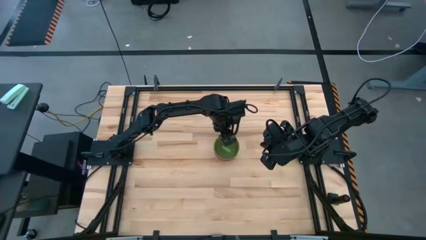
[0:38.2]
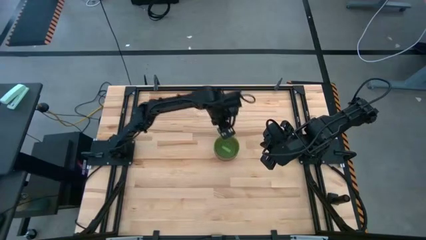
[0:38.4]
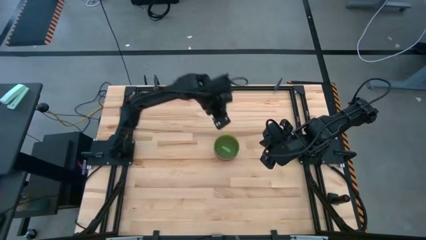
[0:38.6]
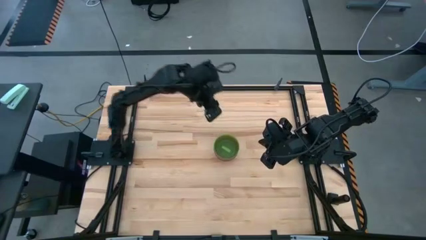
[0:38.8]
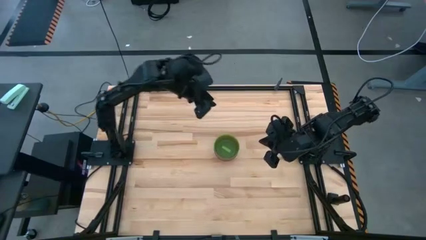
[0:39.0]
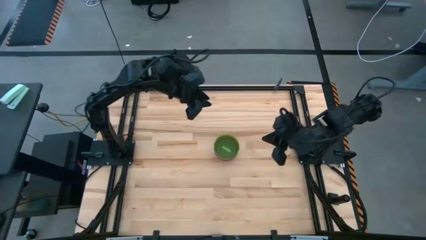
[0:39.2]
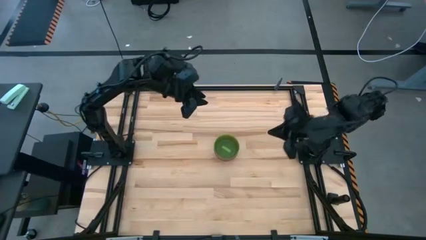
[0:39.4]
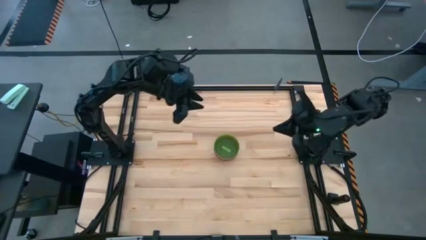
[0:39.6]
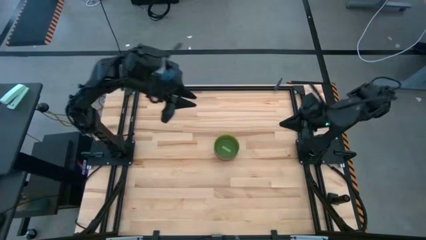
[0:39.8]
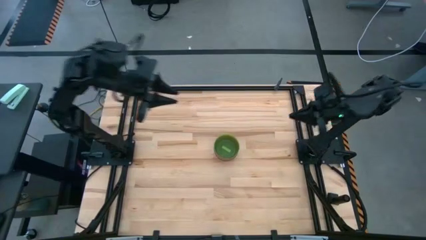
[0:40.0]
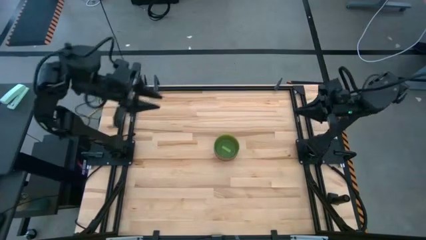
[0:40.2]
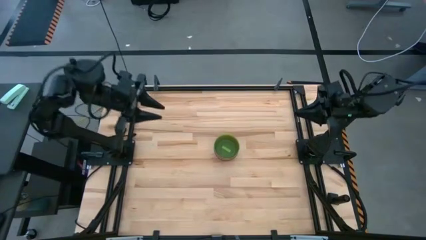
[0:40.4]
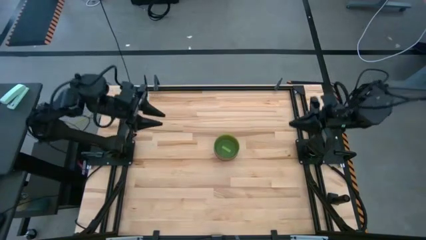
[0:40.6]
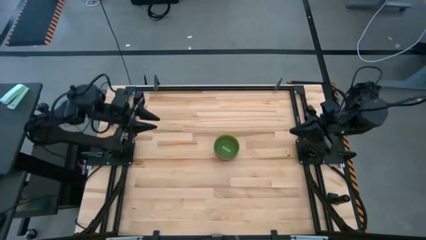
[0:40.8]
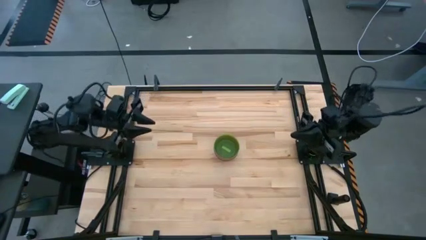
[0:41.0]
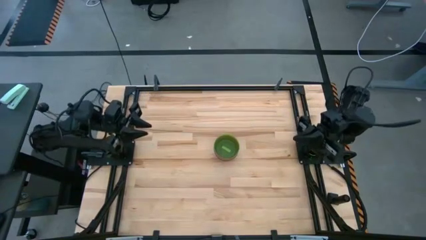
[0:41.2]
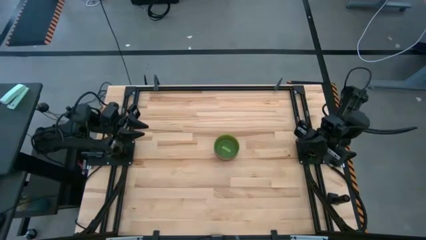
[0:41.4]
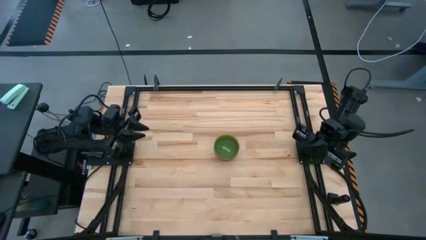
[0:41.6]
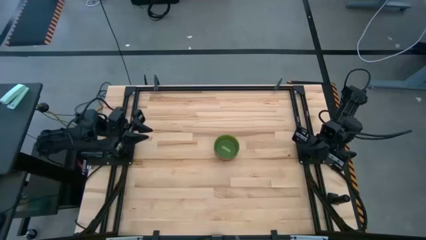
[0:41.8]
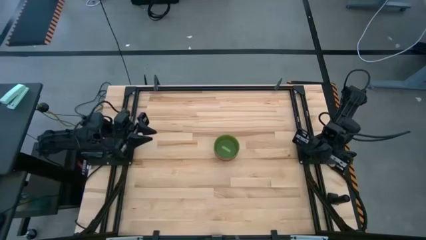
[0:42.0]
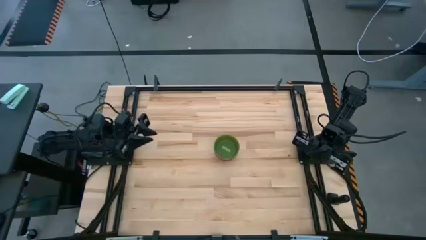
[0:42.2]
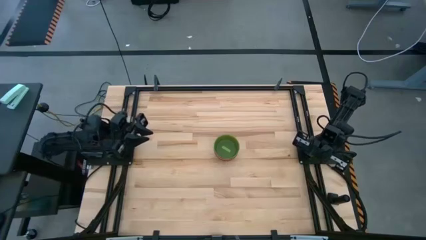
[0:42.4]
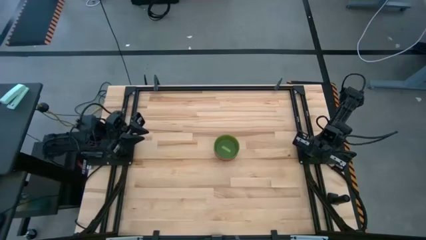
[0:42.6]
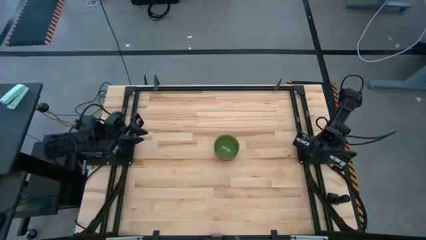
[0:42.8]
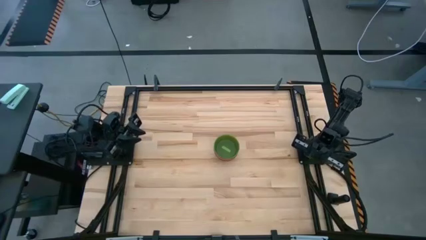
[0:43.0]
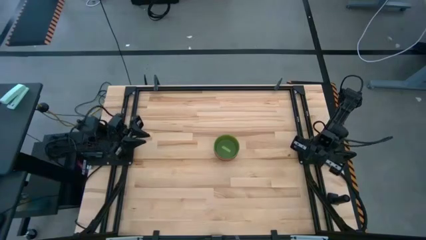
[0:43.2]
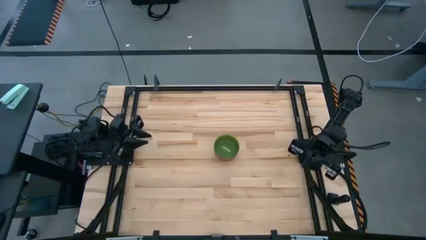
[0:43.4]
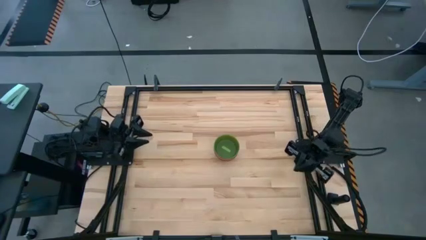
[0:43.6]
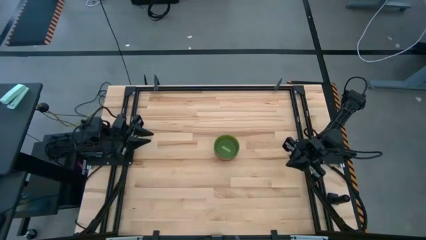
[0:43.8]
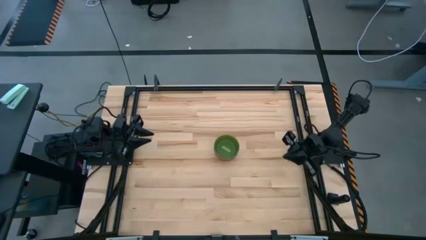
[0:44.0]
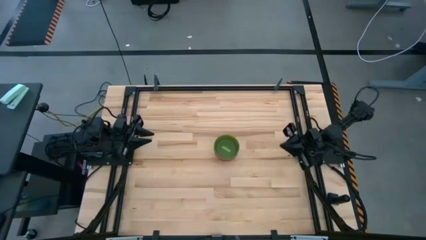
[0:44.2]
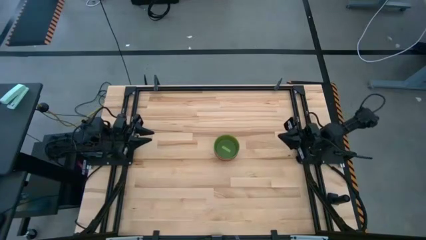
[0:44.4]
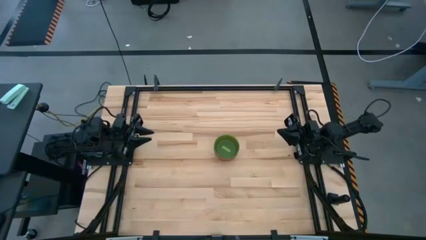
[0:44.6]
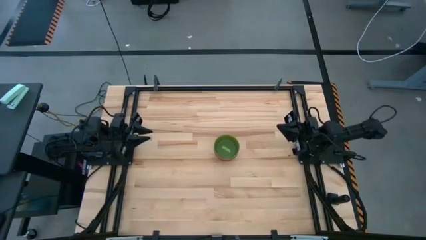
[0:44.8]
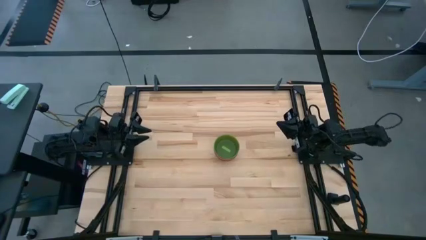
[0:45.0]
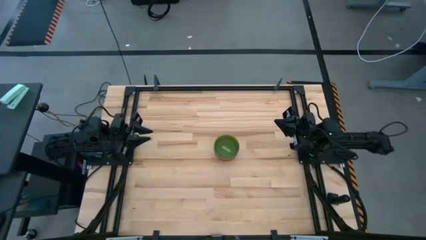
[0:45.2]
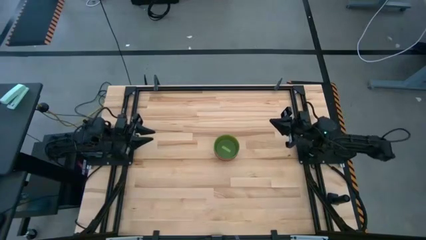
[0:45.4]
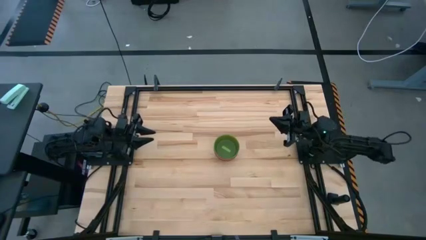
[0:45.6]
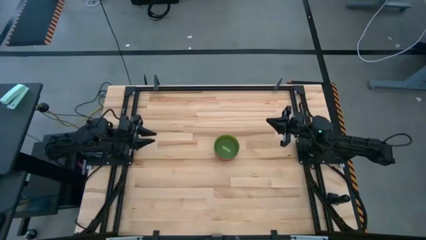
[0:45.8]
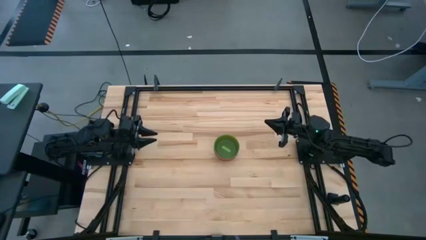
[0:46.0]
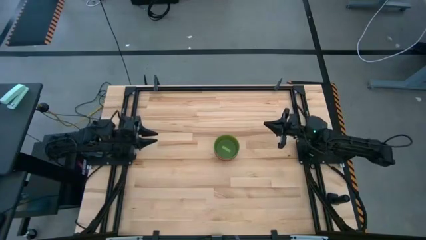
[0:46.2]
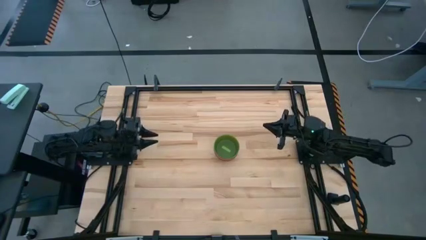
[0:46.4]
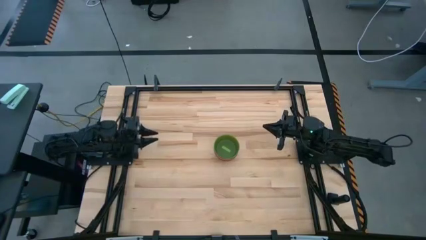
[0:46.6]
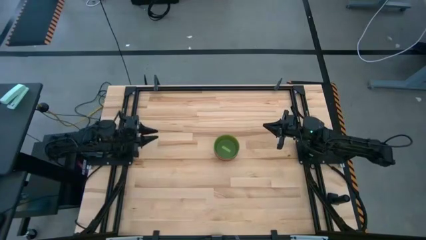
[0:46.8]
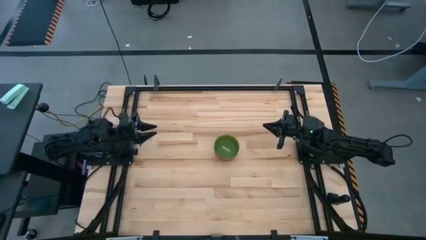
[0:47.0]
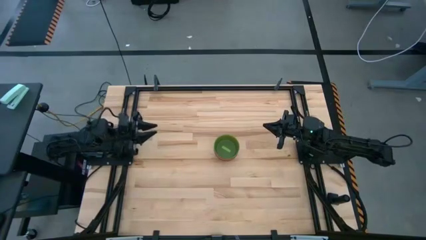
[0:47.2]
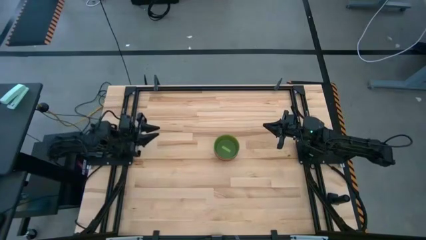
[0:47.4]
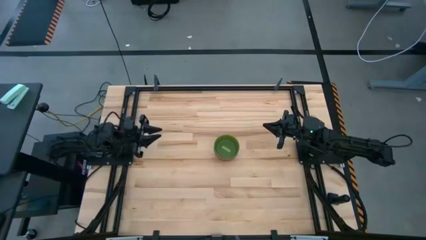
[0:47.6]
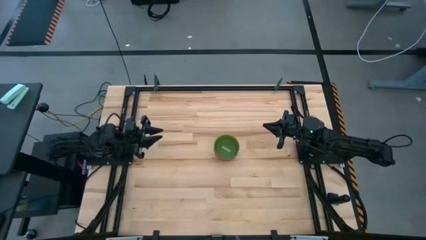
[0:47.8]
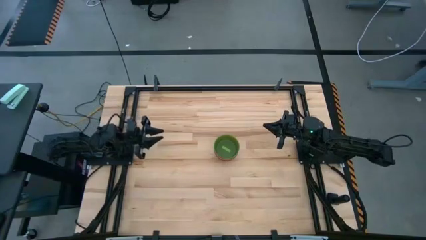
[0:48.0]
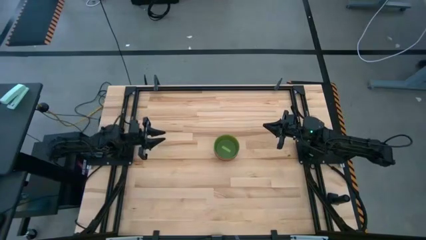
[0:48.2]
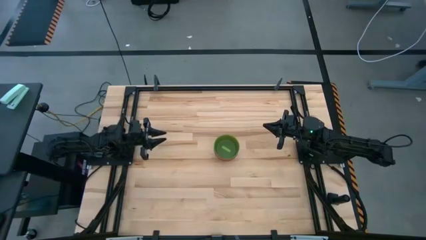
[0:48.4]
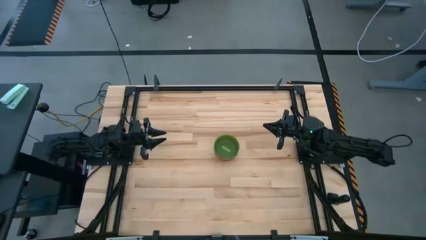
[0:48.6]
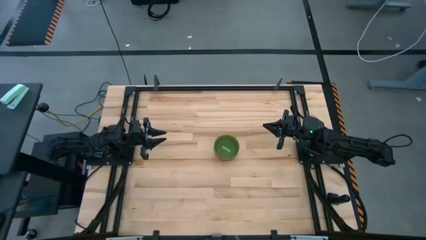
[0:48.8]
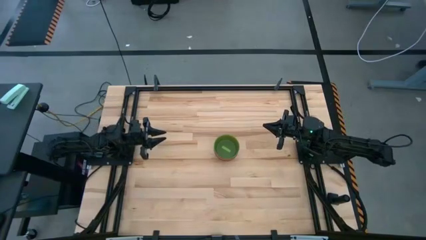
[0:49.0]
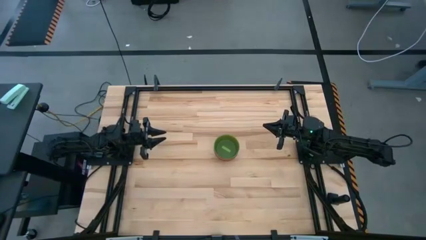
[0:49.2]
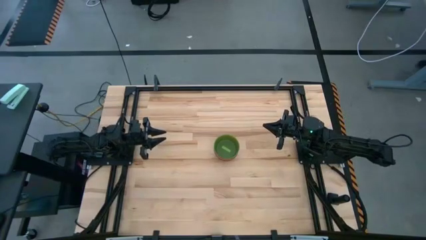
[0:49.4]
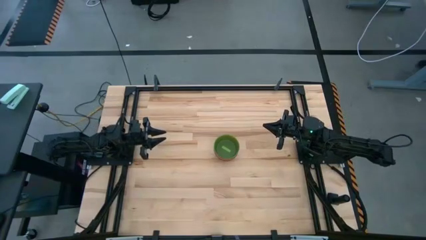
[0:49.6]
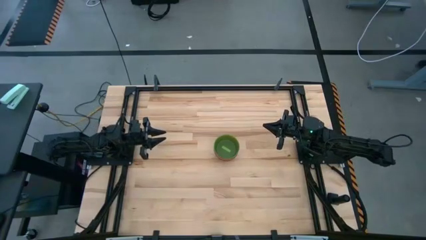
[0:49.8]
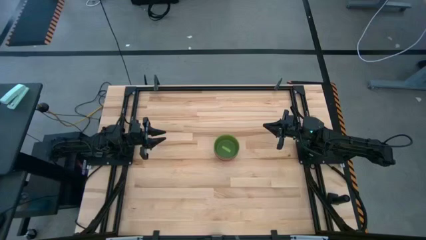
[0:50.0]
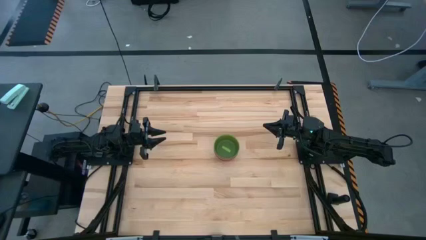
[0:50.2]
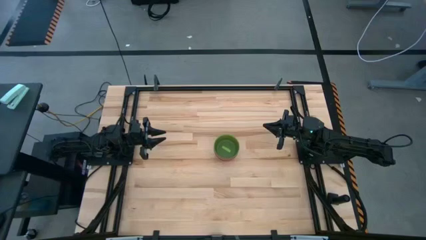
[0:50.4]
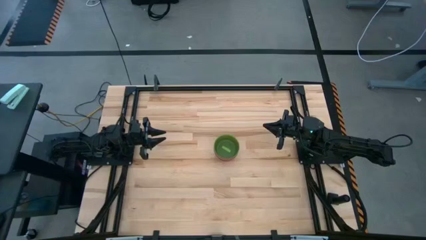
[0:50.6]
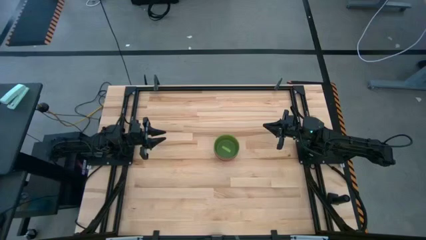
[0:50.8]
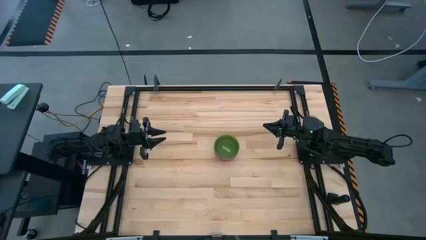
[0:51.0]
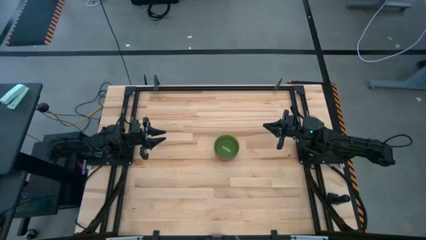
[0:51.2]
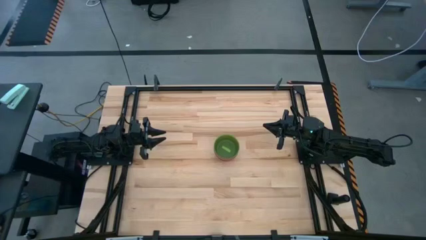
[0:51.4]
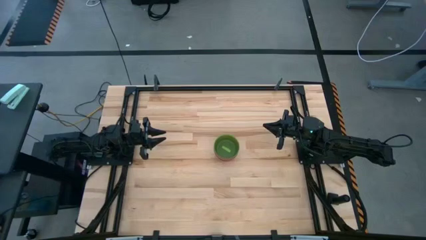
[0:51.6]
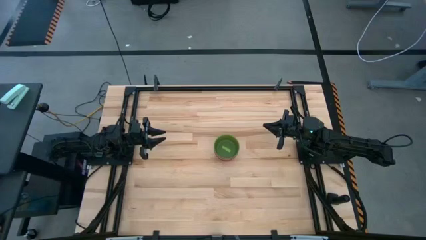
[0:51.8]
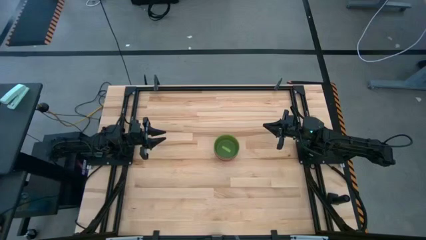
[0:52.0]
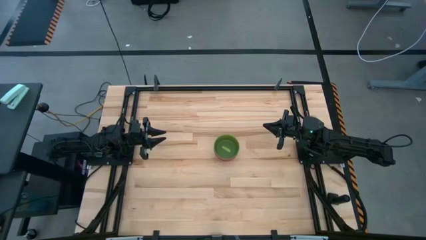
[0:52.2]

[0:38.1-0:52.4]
Task: Nest bowls inside each other
Return to Home Position

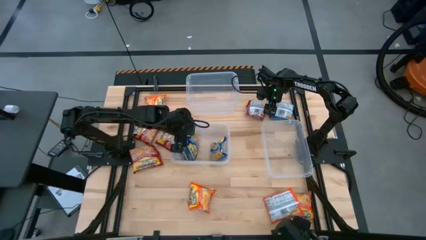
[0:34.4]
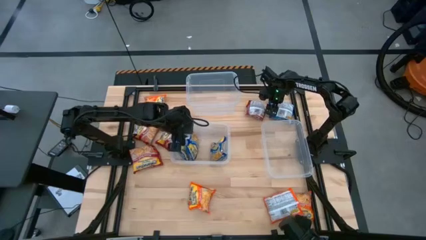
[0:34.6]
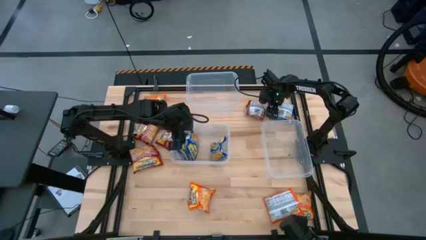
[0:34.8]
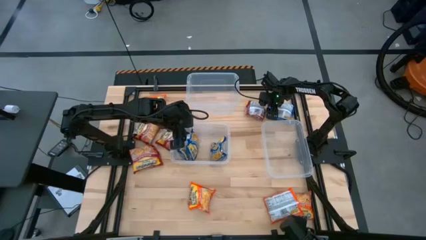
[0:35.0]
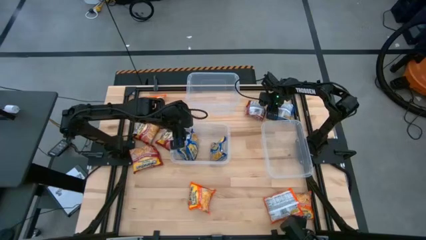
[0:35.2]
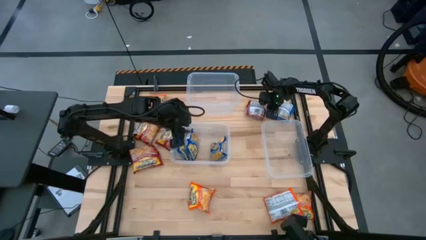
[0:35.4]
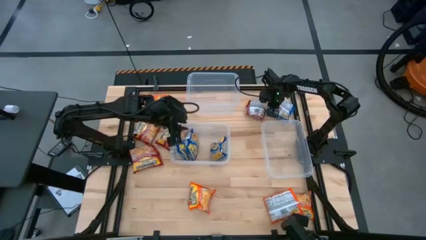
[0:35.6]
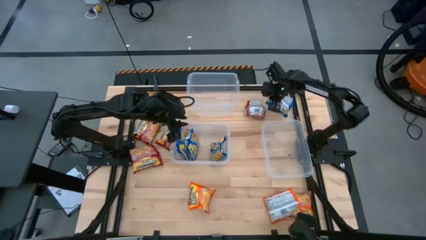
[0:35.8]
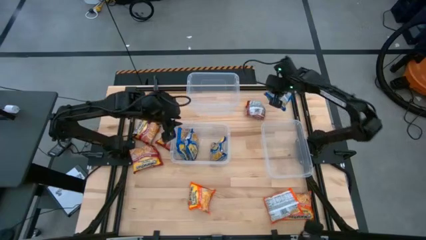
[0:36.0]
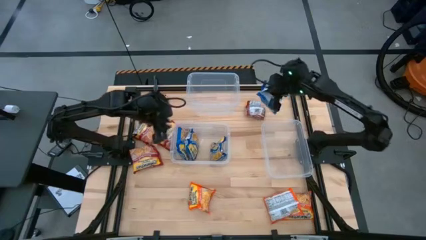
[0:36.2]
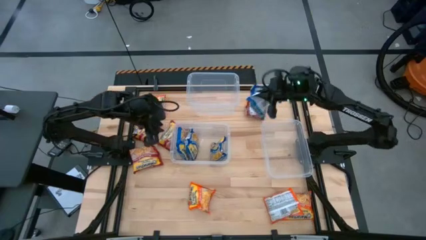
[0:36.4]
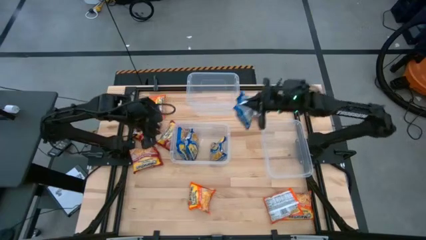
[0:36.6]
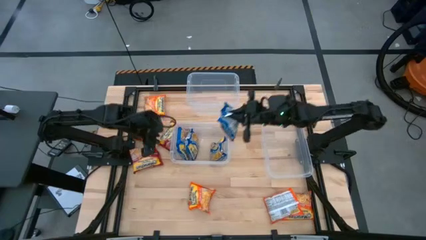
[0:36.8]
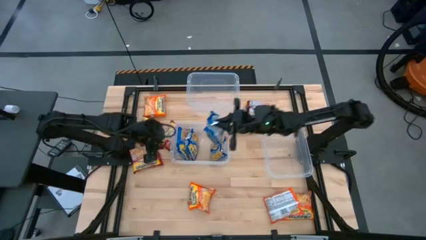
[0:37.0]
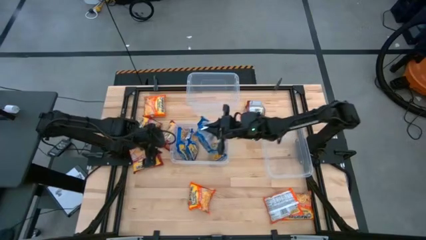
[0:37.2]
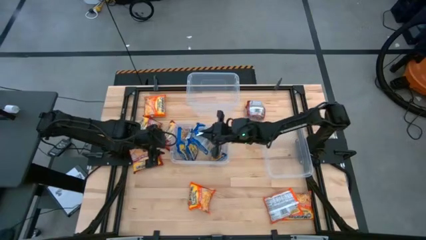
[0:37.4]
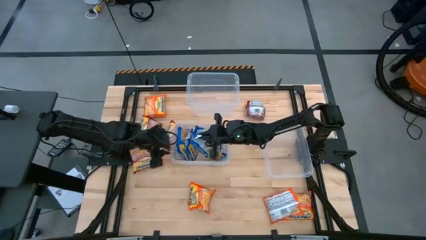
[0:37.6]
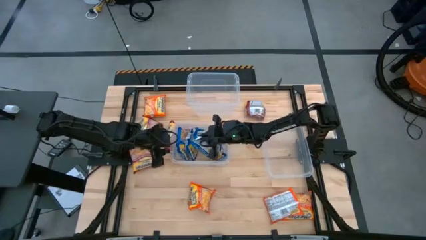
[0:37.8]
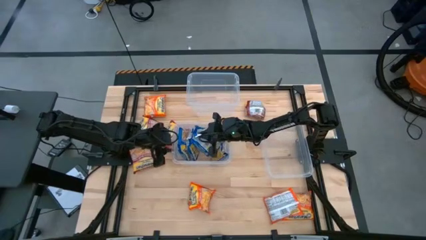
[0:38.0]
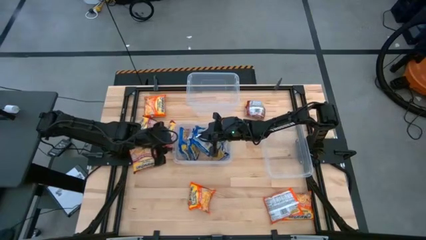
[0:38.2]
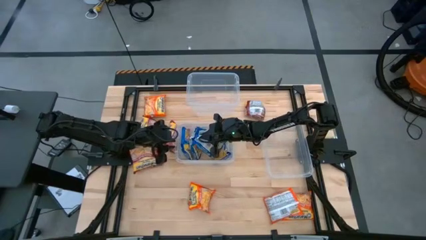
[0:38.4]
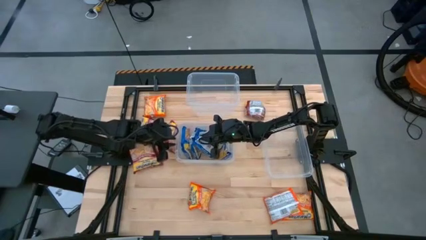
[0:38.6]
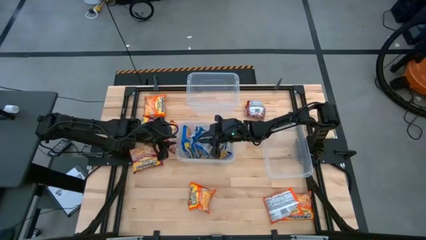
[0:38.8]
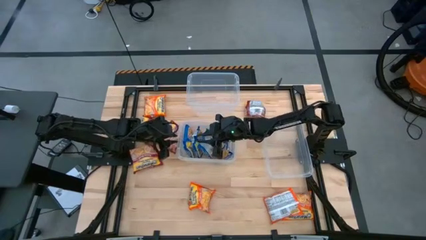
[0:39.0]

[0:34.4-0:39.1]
Task: Sort Maruchan noodles
Put the blue noodle pack into the bottom left transparent bin
